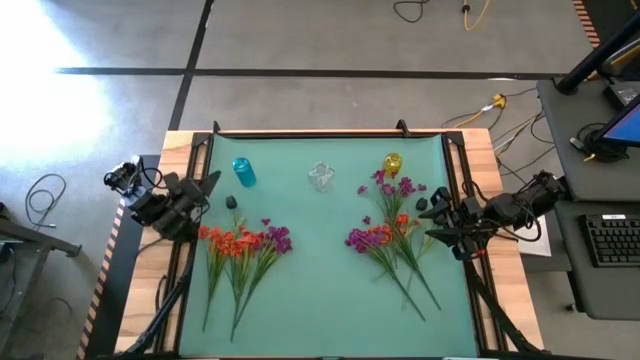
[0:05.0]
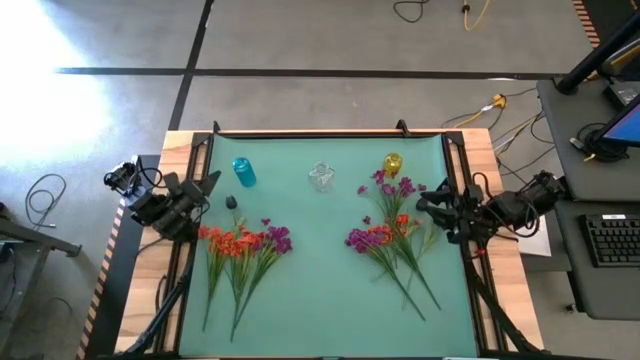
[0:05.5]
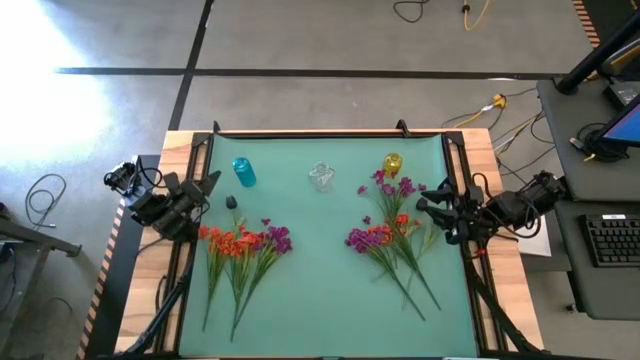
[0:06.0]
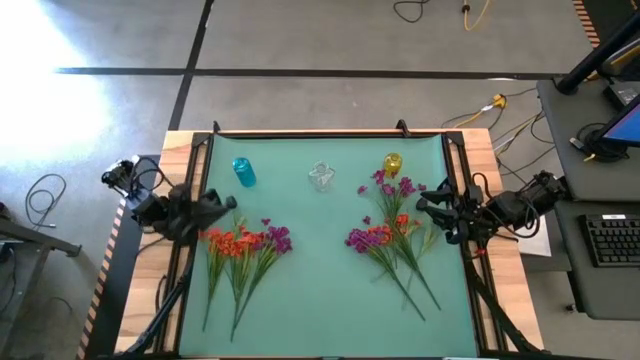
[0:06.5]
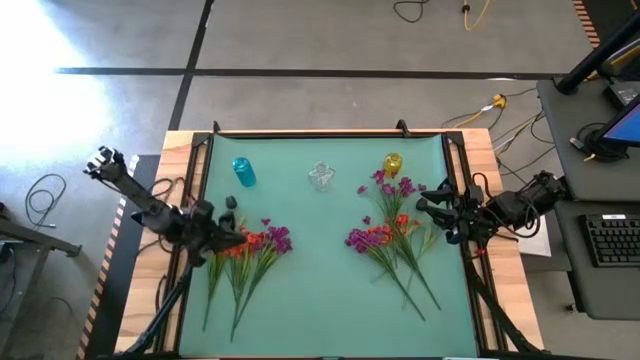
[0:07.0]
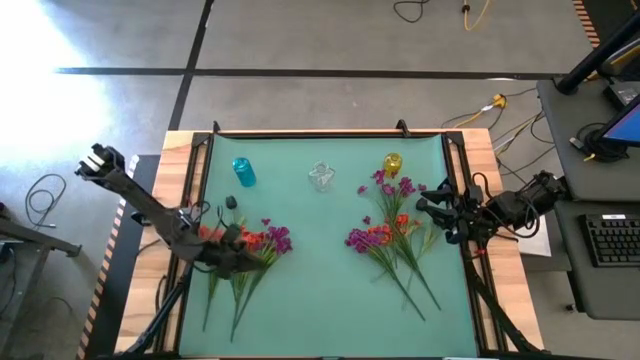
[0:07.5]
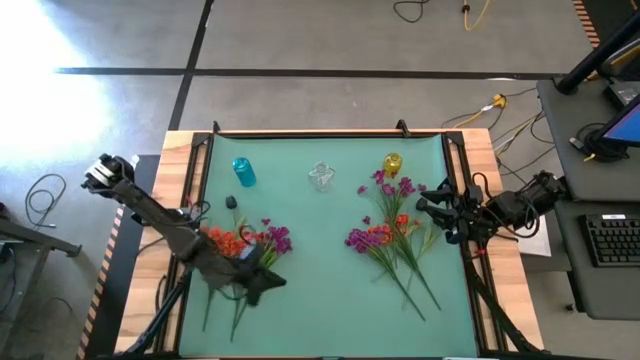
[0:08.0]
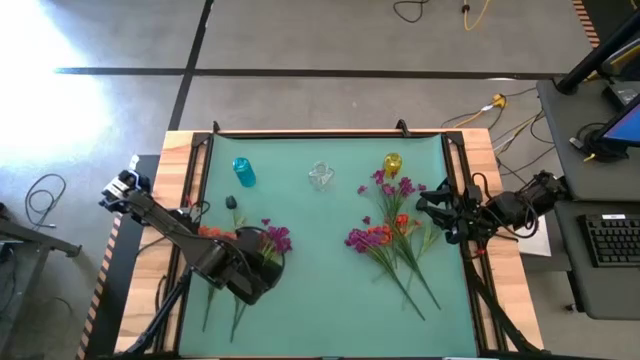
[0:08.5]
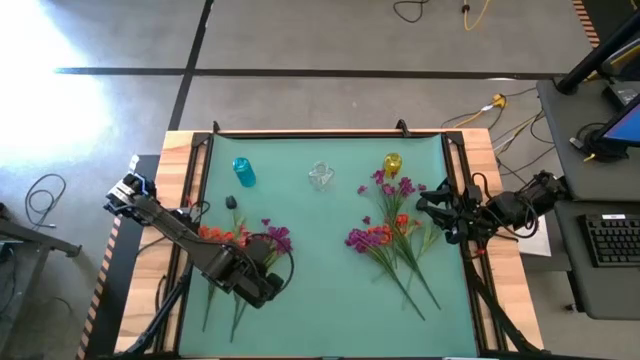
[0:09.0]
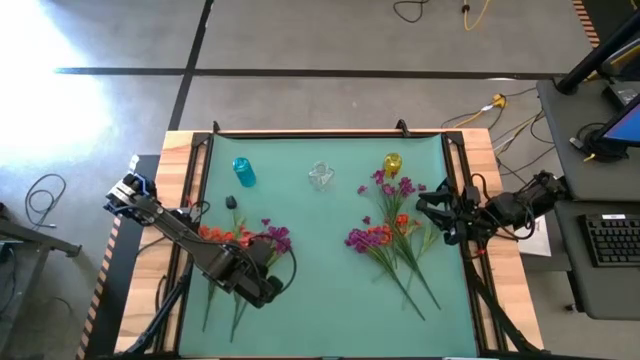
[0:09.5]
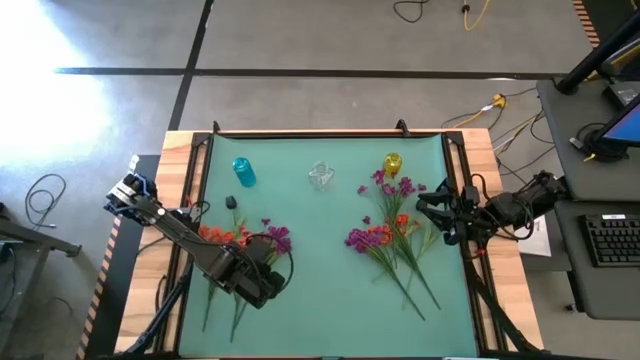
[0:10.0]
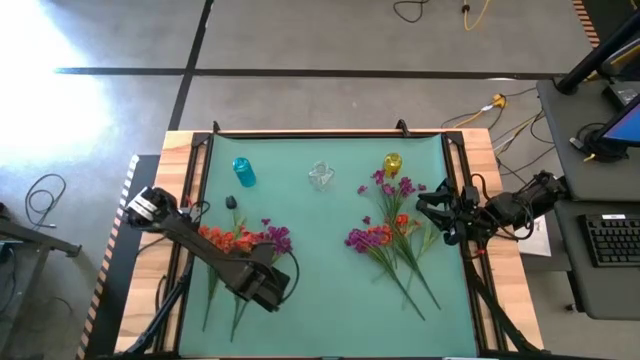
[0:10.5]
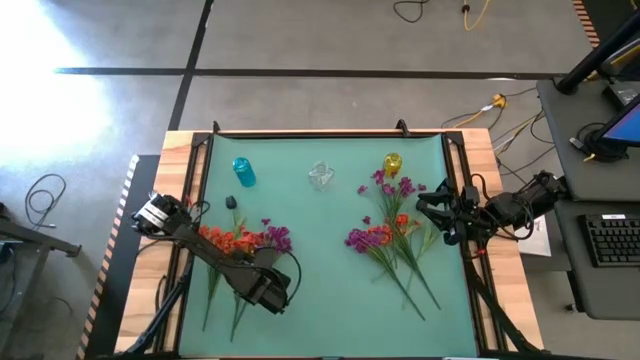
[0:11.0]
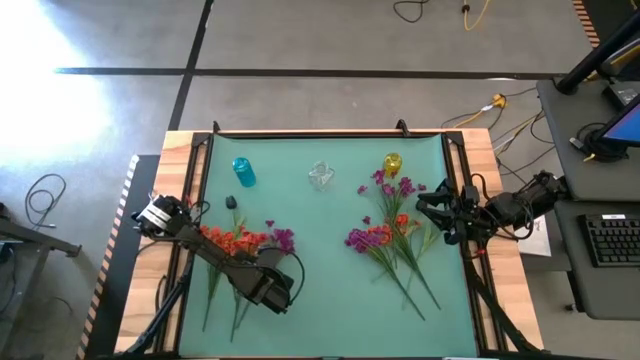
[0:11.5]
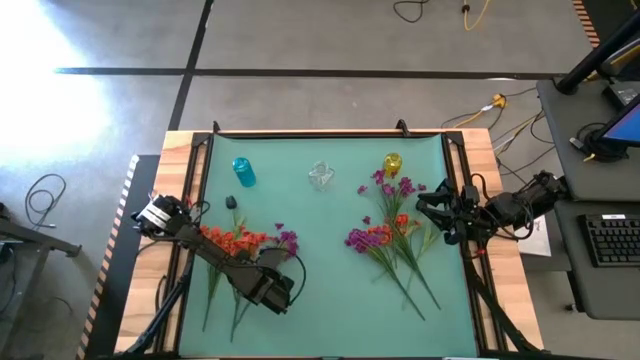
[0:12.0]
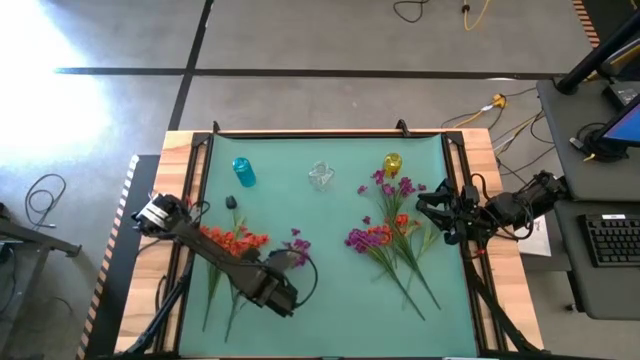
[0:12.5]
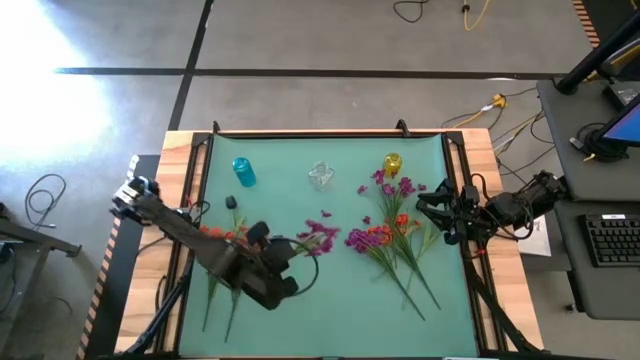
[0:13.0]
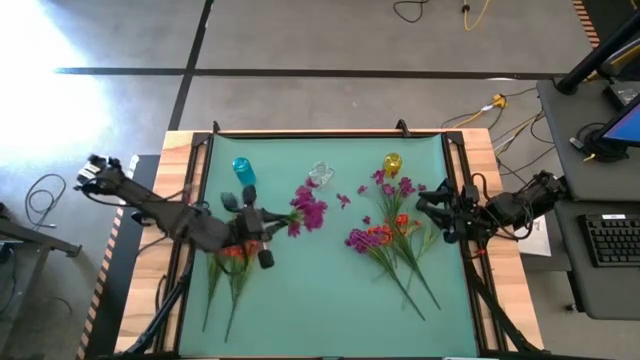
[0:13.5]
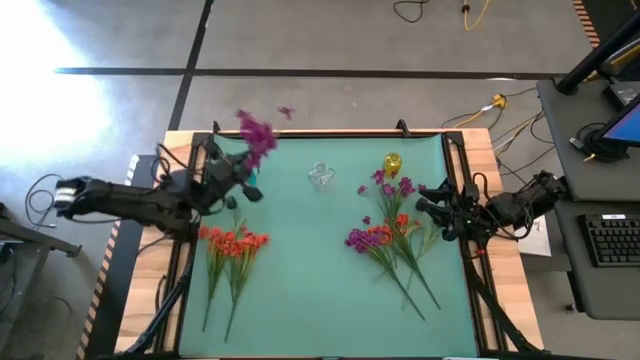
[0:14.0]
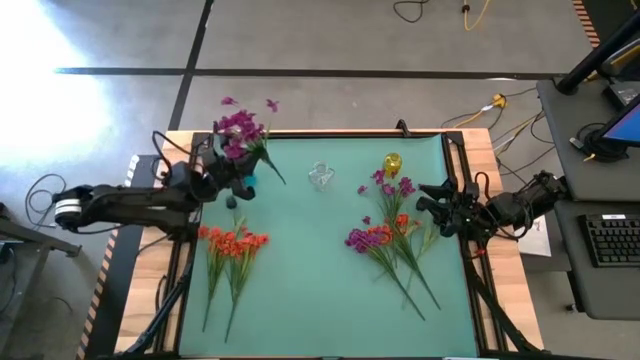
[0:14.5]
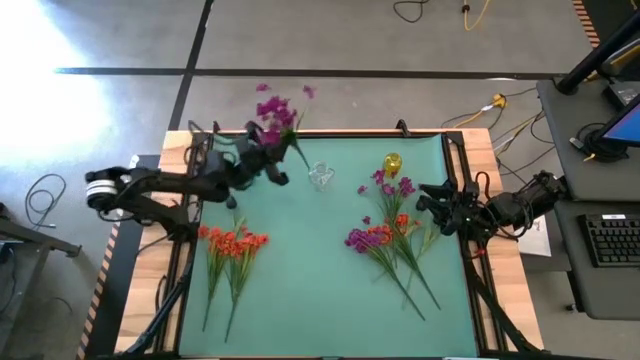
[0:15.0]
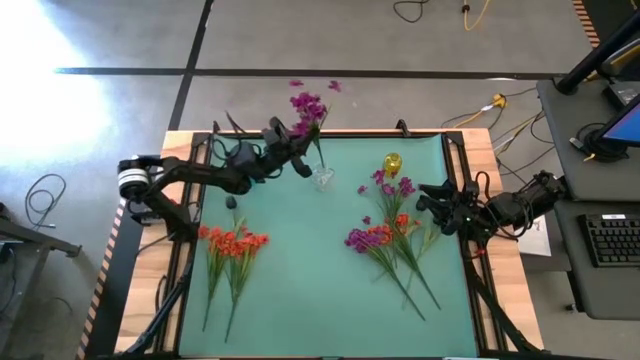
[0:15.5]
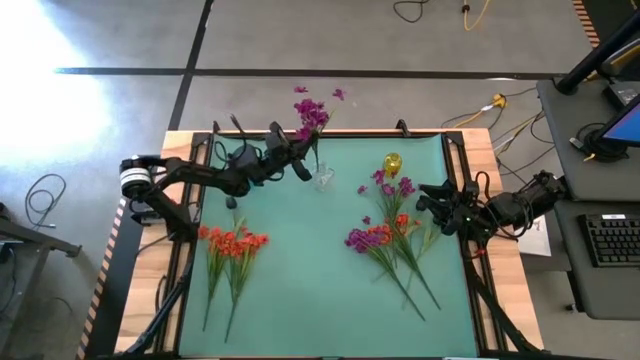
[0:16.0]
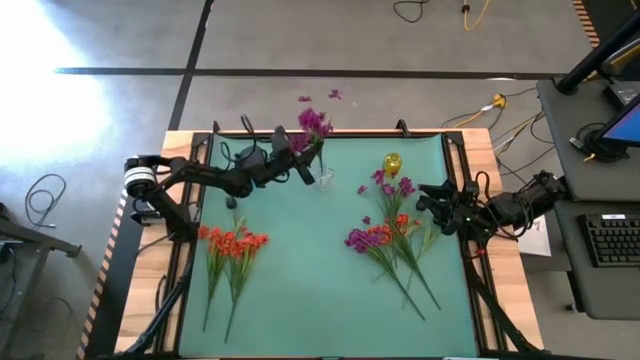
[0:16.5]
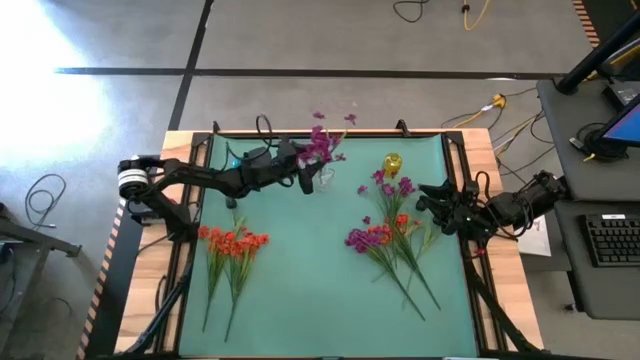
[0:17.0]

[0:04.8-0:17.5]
Task: Sort flowers into vase by color
Put the bottom left violet flowers into the transparent flower vase

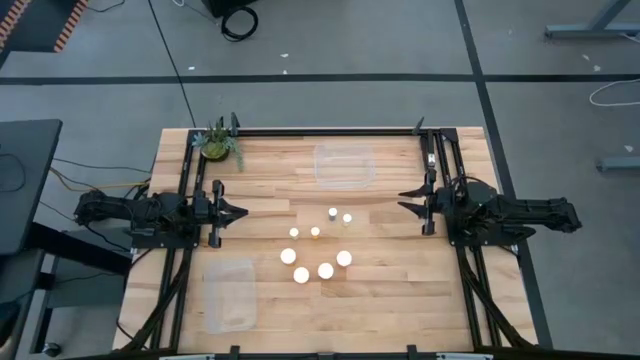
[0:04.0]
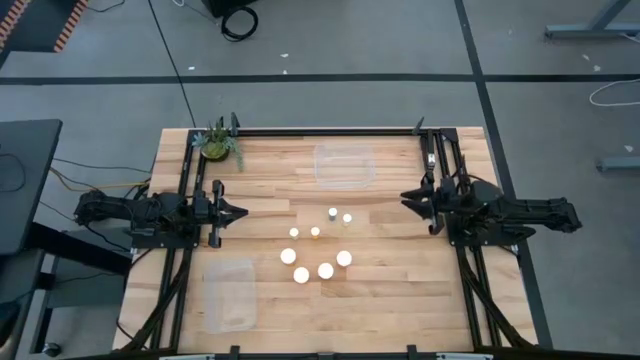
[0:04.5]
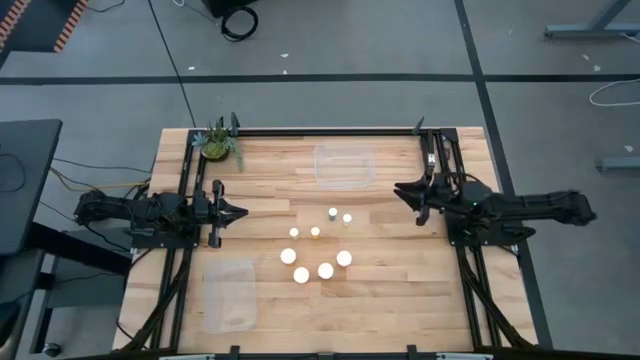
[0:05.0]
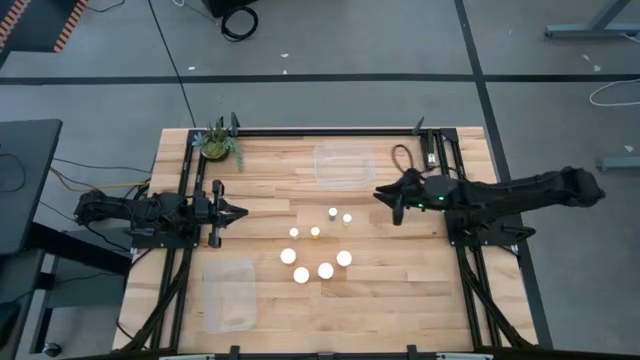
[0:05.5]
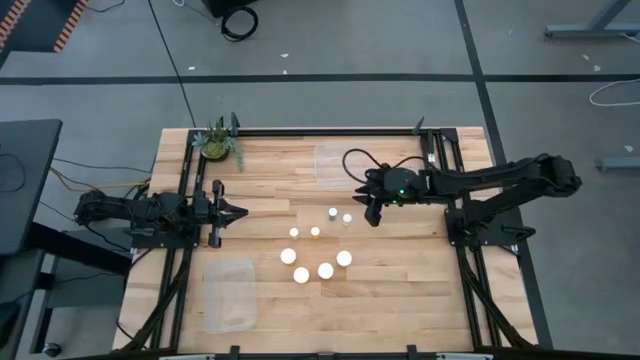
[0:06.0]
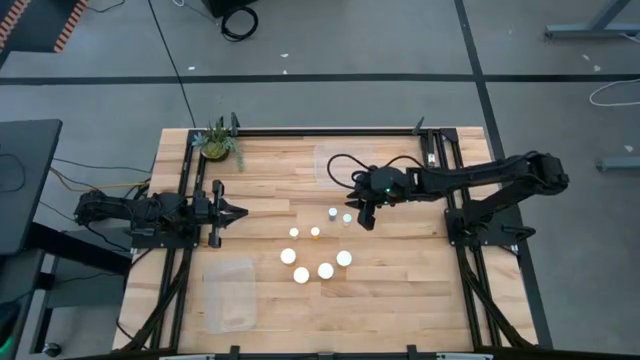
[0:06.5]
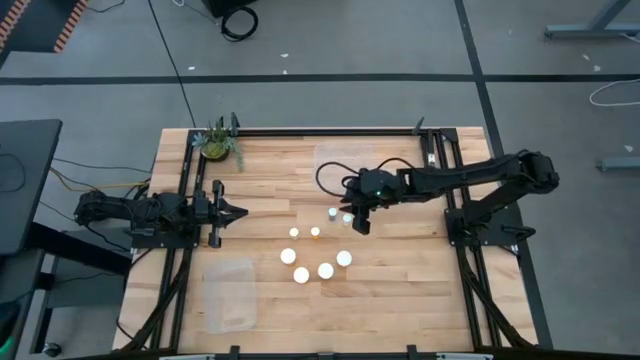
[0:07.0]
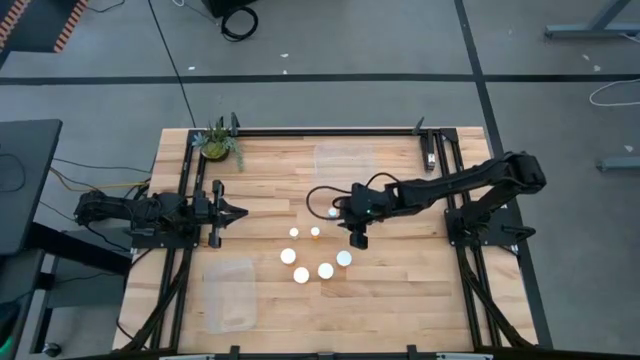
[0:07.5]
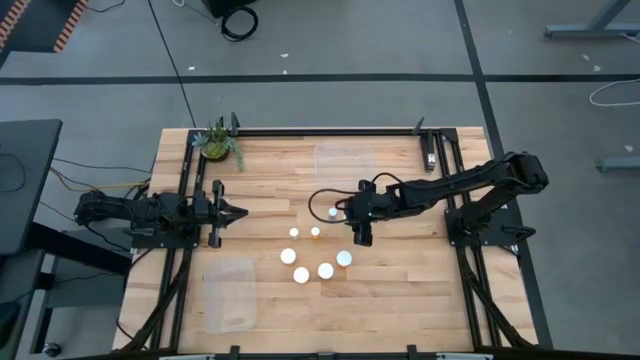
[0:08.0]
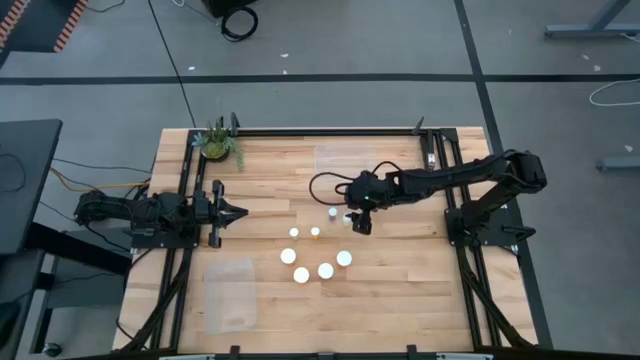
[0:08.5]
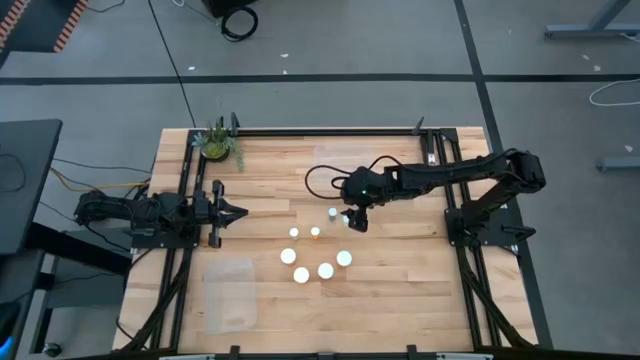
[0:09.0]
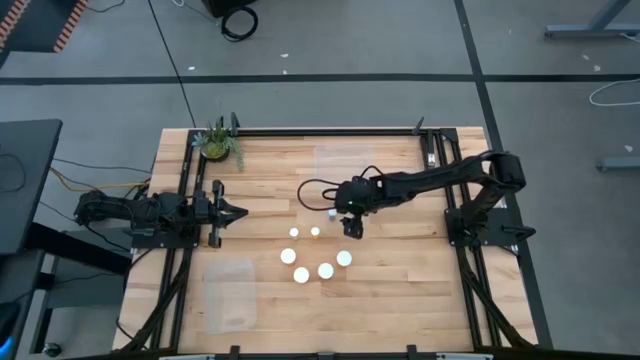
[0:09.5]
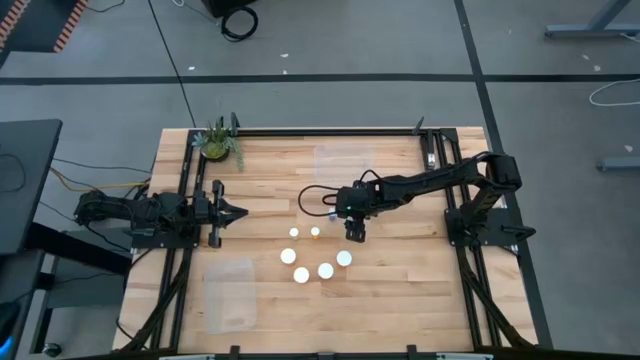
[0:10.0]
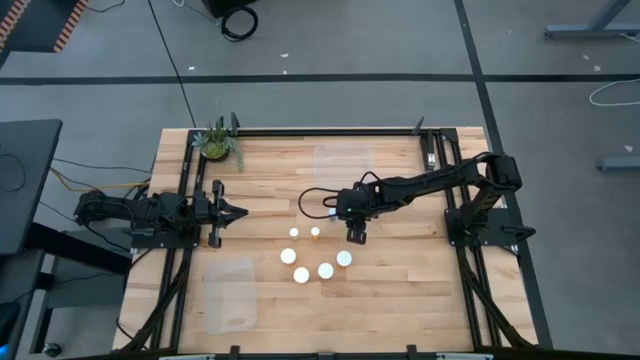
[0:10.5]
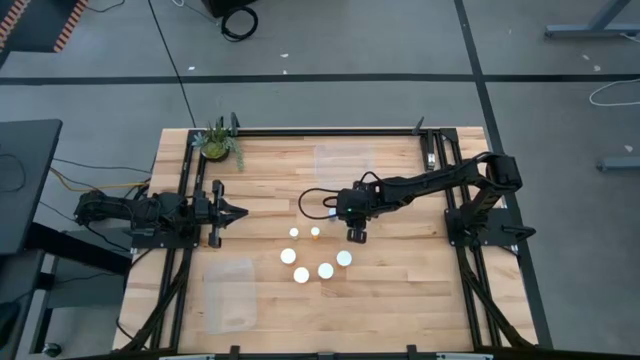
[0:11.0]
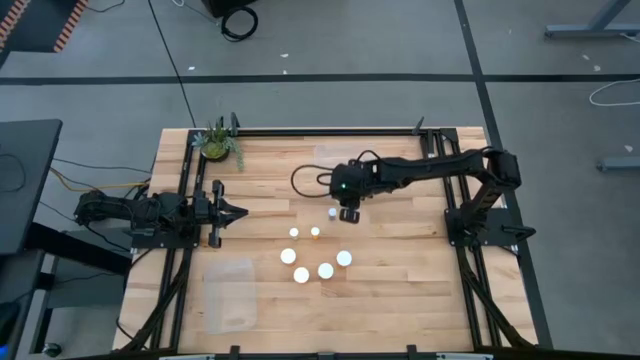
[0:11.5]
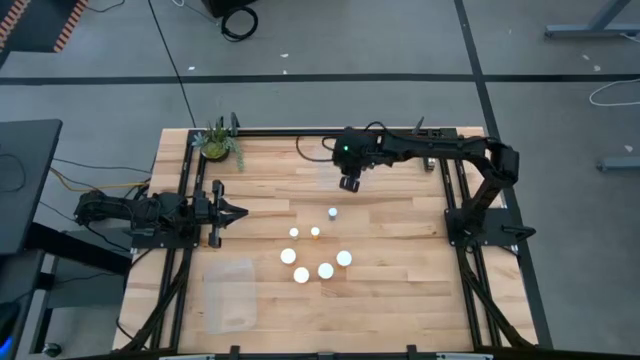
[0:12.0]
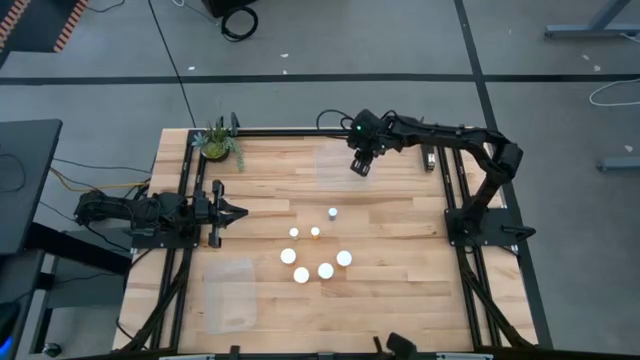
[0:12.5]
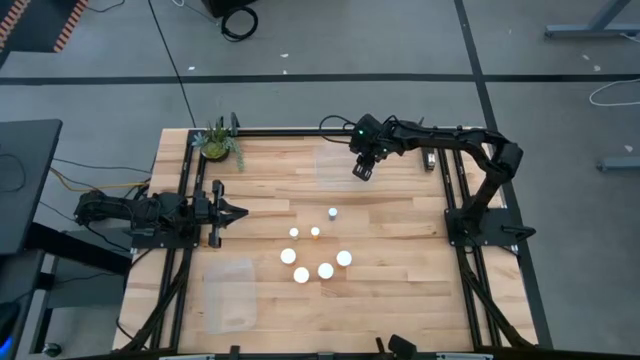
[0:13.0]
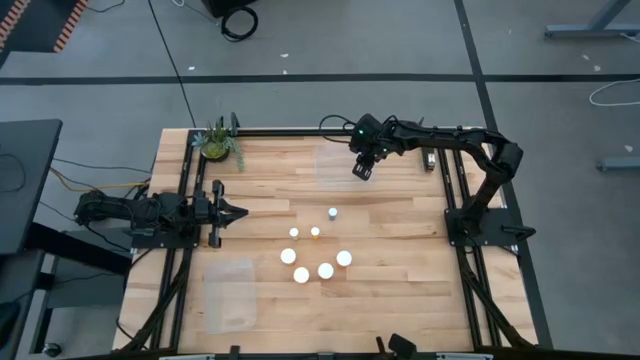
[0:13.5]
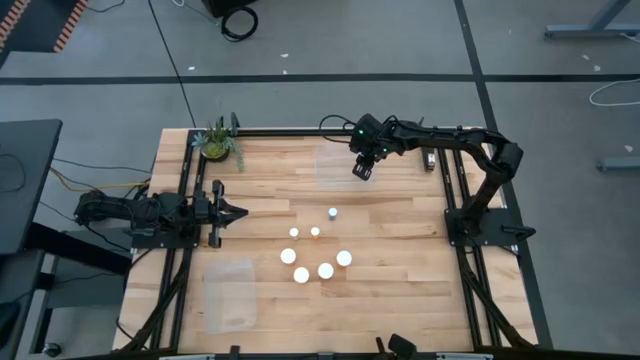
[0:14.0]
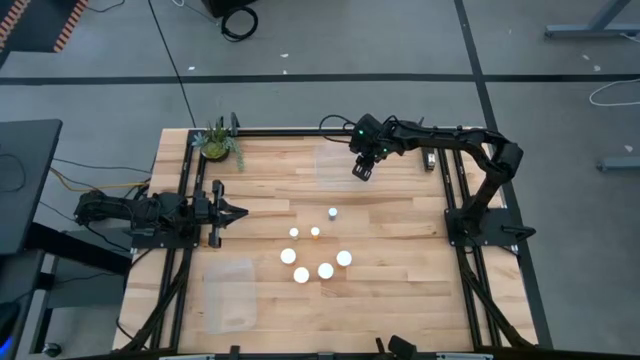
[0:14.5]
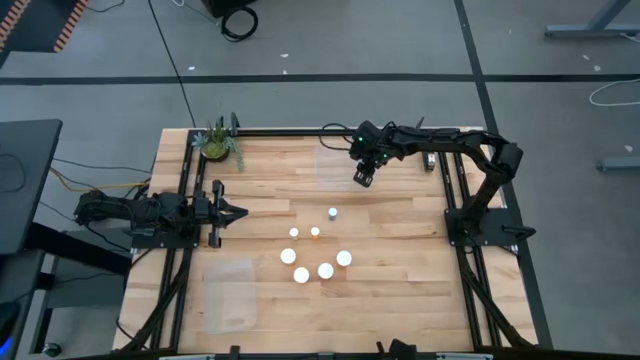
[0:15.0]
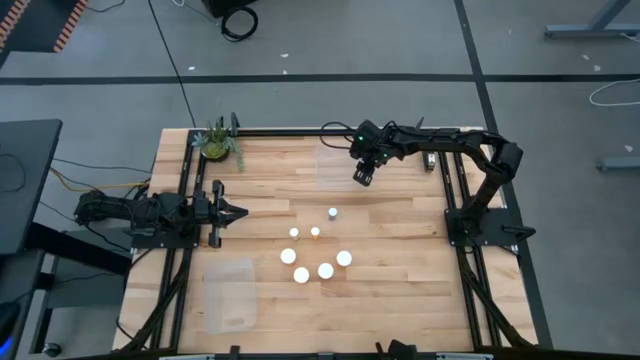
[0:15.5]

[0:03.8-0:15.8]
Task: Pick and place medicine bottles into bin by pill shape (circle, oval)
Put the small yellow pill bottle into the top transparent bin
